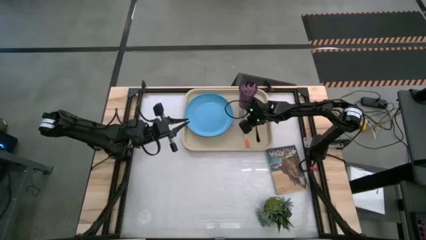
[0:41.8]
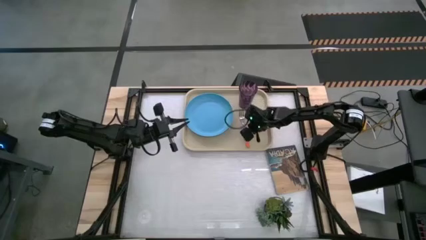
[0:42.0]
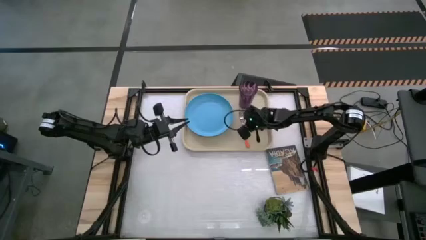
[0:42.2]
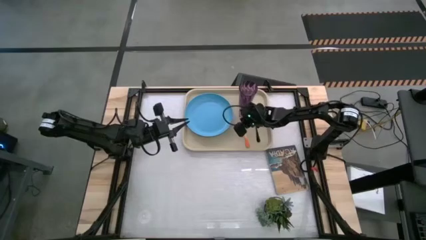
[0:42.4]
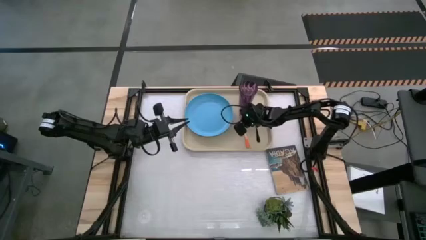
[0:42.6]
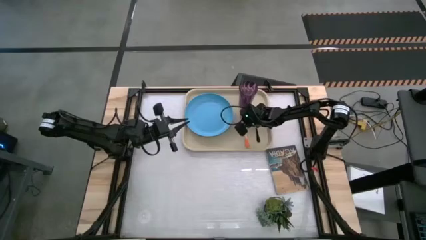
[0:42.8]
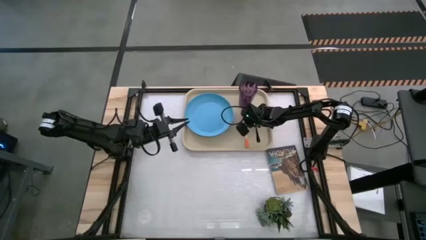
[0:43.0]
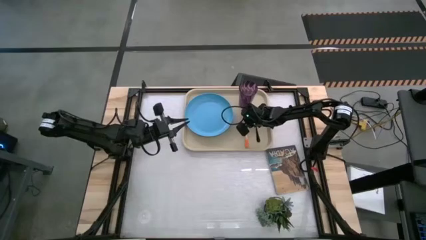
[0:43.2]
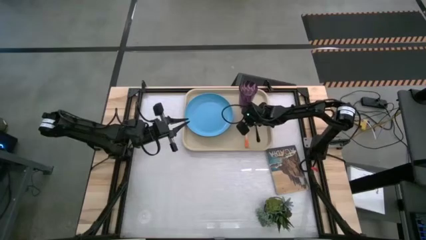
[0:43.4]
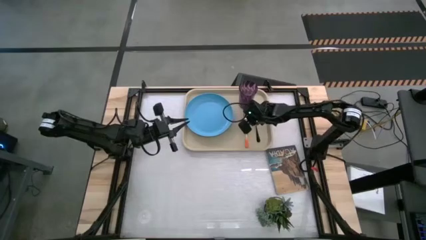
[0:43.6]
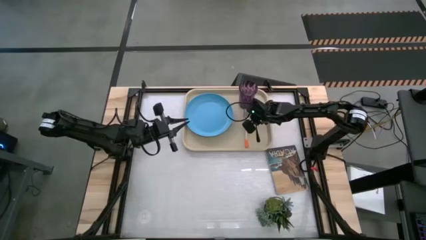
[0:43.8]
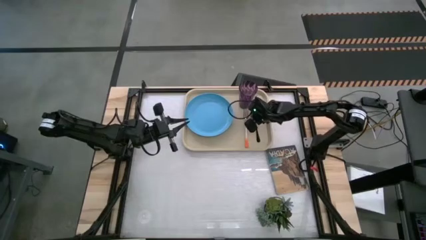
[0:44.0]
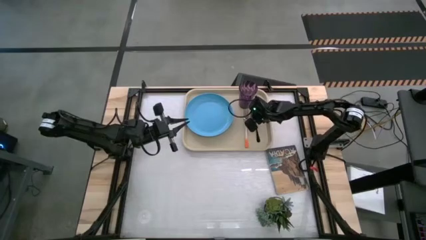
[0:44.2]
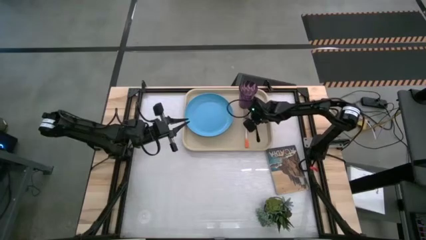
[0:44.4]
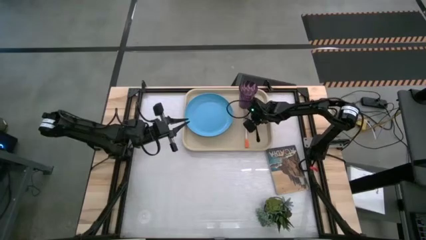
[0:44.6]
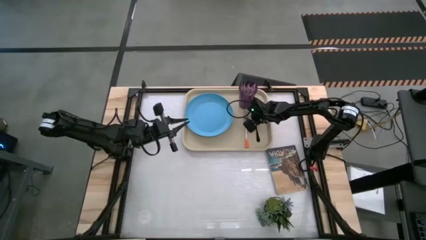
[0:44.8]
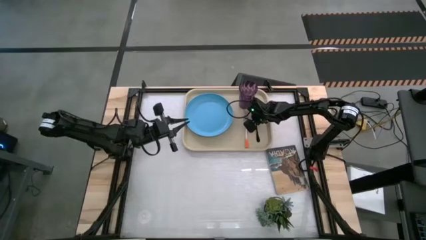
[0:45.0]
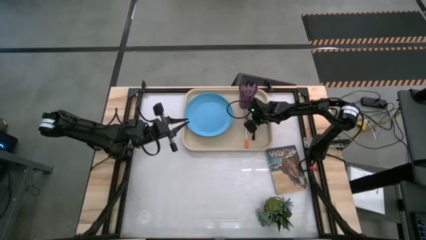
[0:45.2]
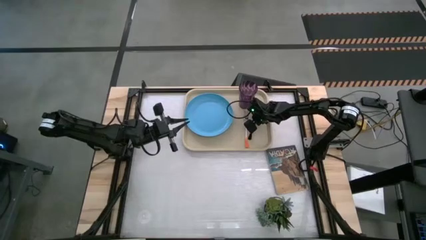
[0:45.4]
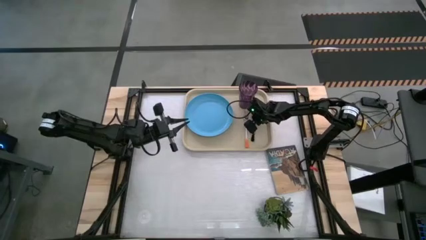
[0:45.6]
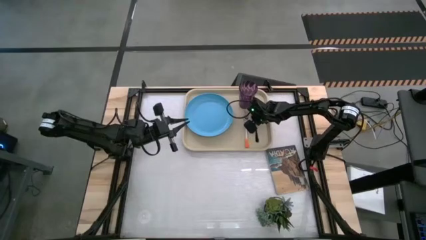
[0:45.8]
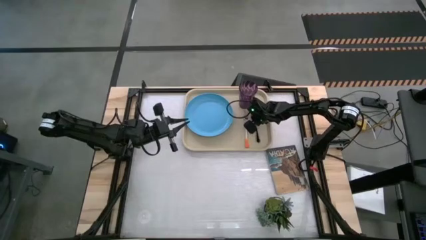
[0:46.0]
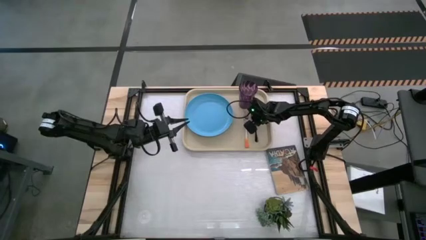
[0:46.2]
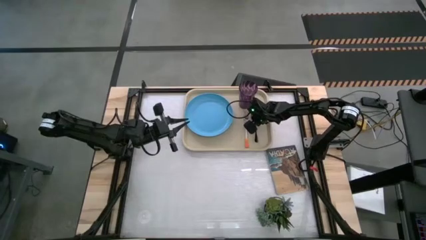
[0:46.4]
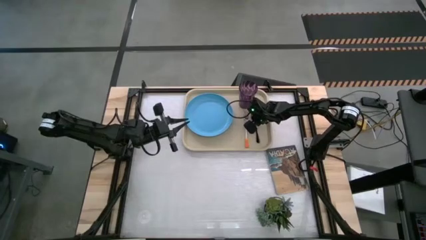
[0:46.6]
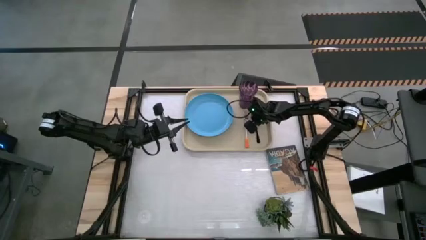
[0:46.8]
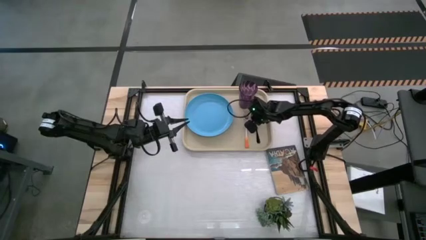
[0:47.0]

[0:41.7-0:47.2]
Task: Pick and place plate/cup/fork/spoon on tray
Adjust the black spoon

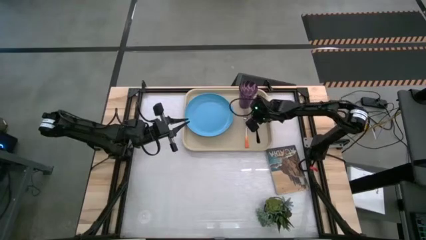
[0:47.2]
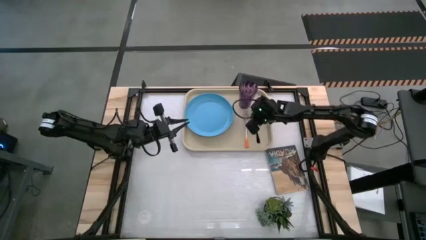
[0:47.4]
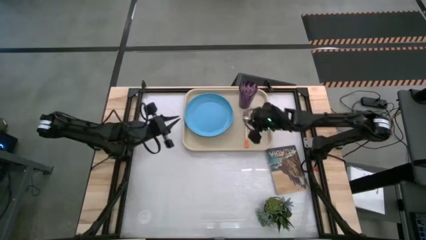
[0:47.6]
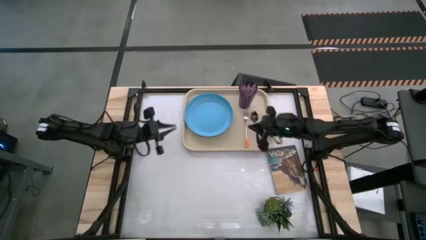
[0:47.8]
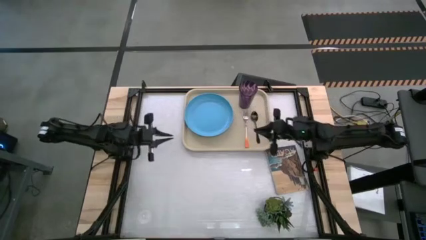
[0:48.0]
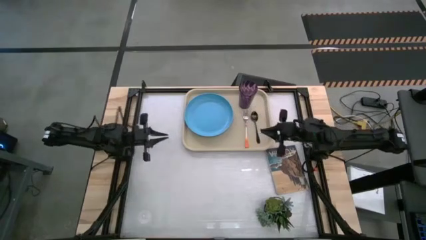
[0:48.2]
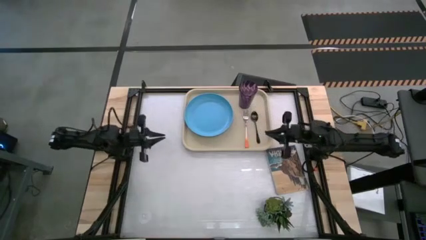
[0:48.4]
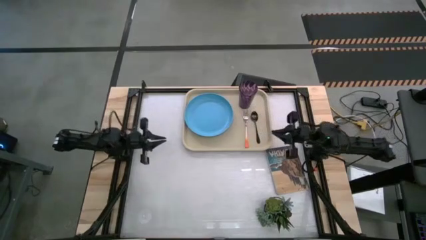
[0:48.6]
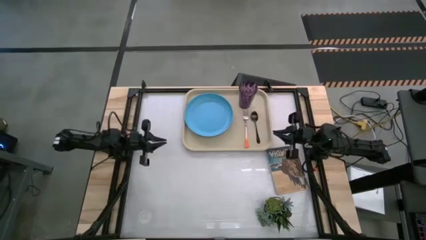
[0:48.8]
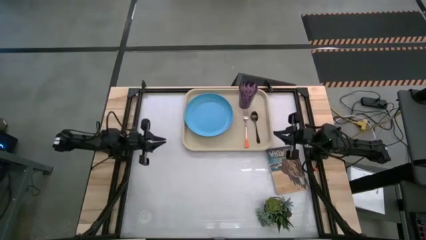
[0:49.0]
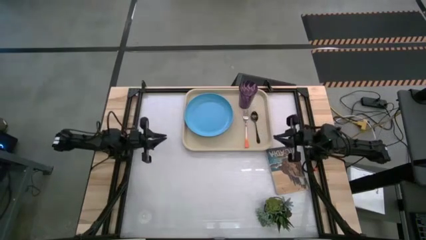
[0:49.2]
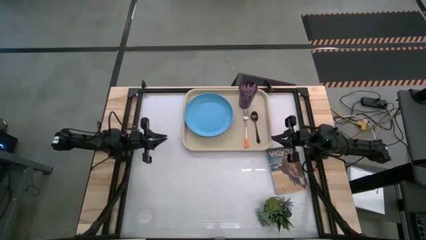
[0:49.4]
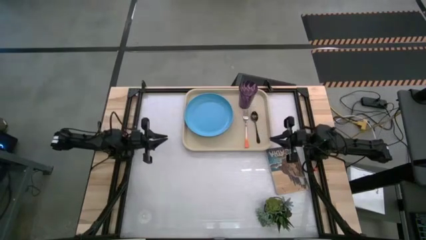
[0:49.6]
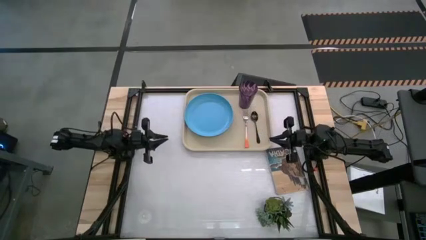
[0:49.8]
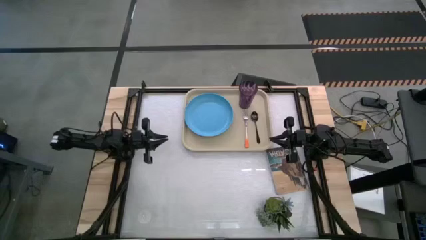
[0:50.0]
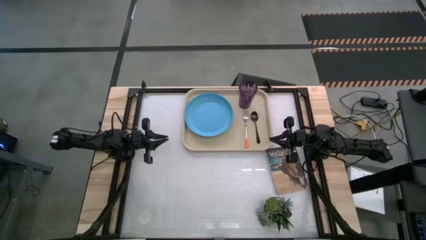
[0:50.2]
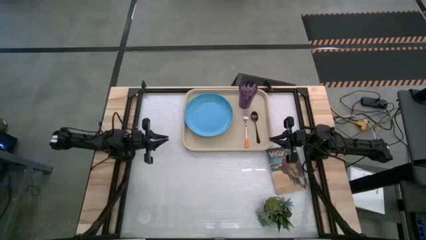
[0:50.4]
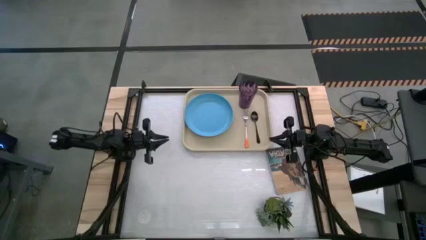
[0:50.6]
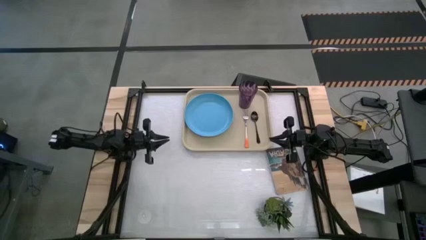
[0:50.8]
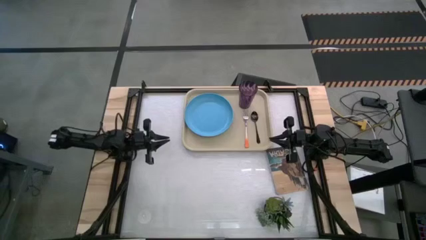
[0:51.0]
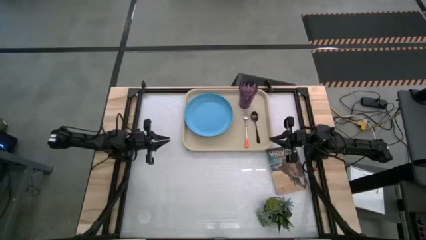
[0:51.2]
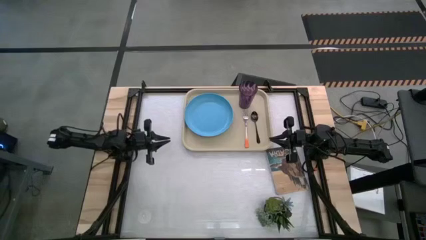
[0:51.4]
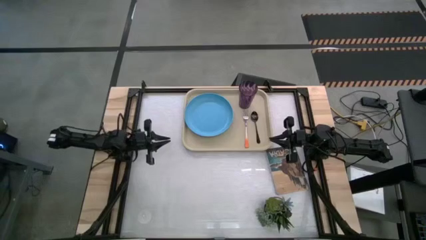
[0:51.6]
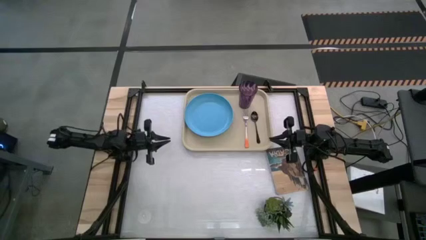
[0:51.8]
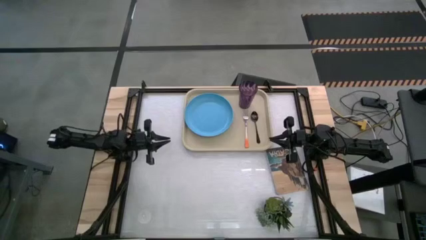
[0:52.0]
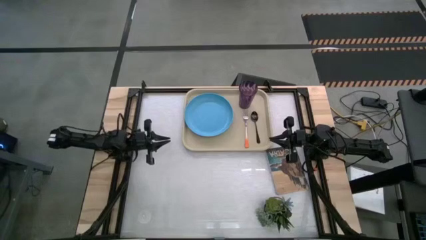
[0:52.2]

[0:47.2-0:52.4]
Return to Home Position

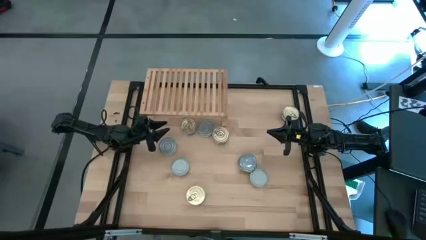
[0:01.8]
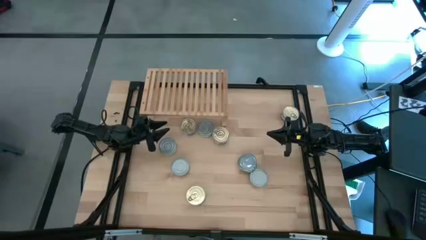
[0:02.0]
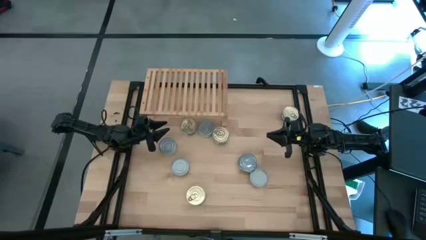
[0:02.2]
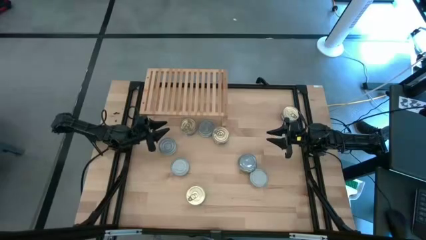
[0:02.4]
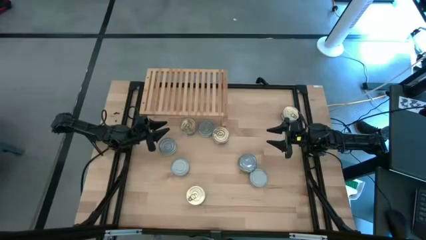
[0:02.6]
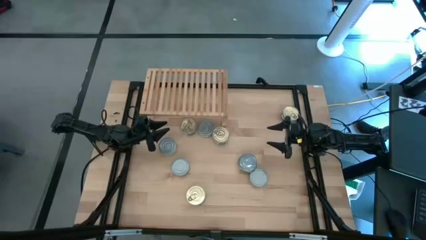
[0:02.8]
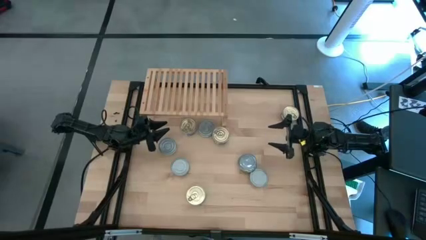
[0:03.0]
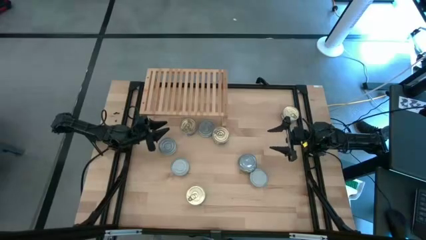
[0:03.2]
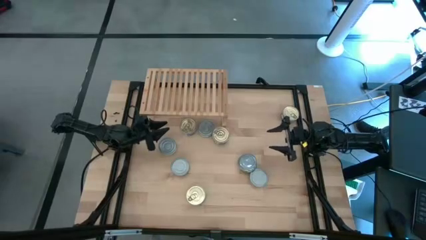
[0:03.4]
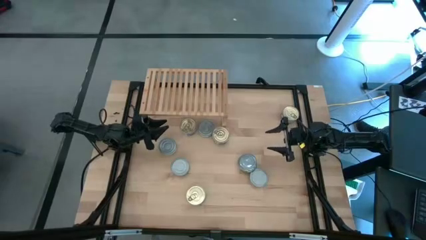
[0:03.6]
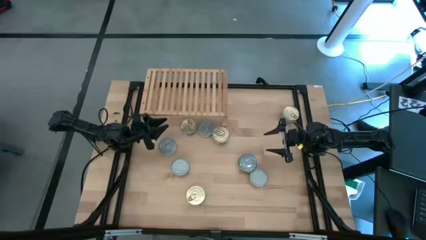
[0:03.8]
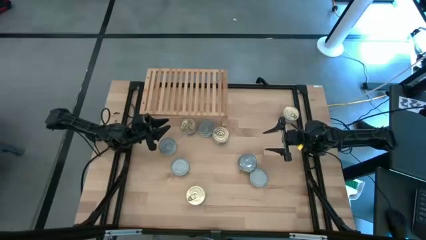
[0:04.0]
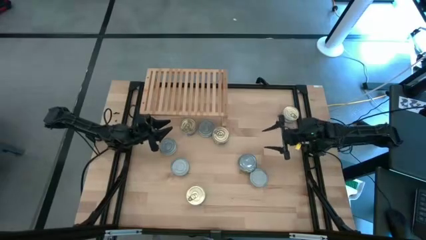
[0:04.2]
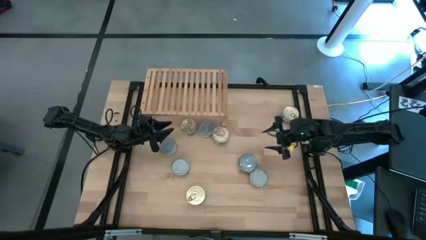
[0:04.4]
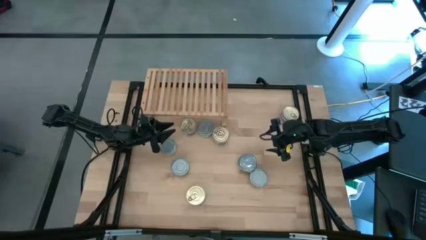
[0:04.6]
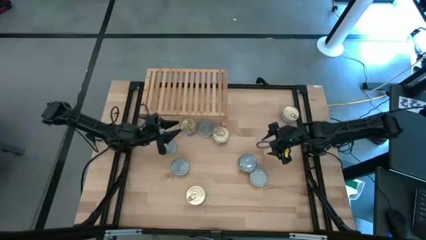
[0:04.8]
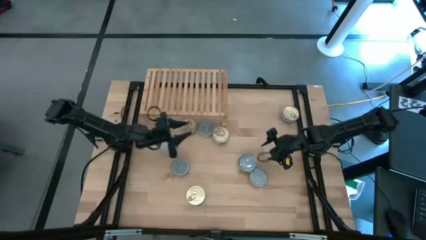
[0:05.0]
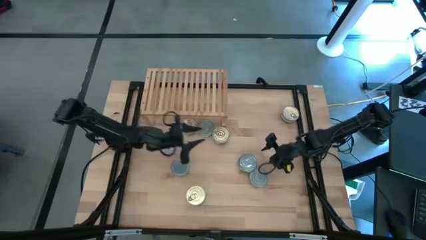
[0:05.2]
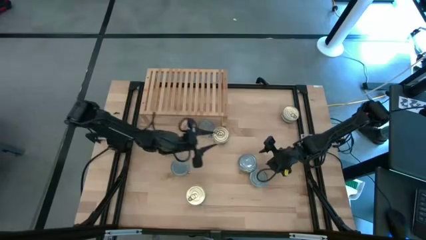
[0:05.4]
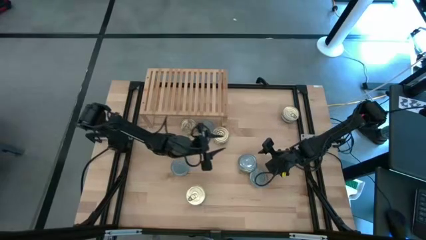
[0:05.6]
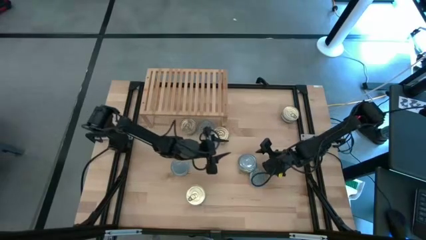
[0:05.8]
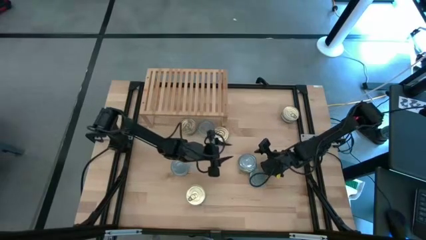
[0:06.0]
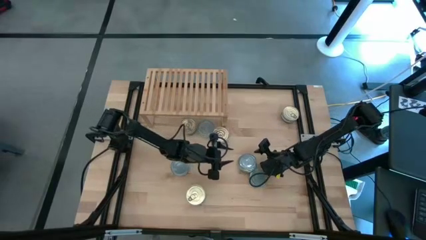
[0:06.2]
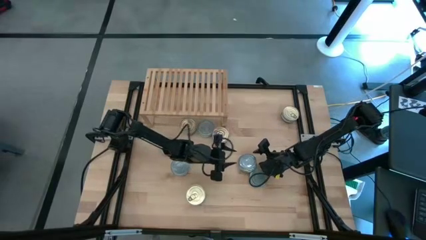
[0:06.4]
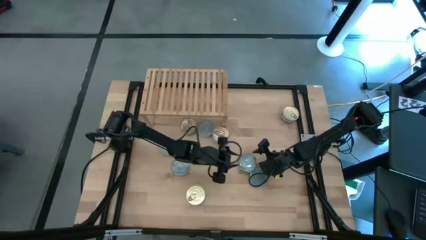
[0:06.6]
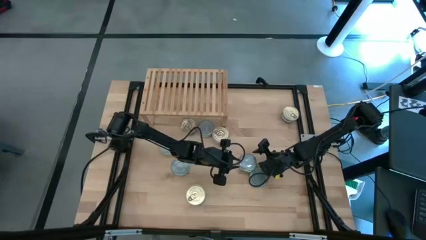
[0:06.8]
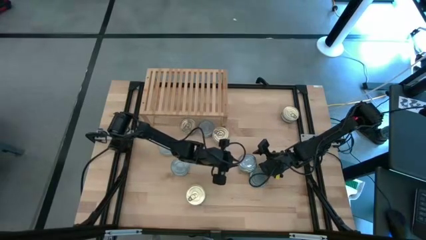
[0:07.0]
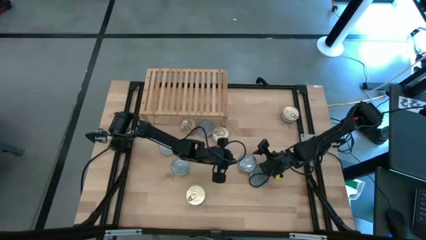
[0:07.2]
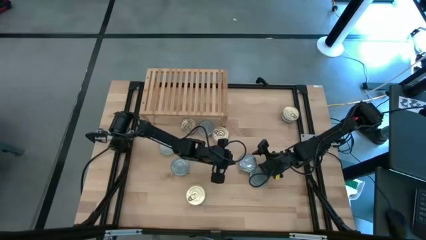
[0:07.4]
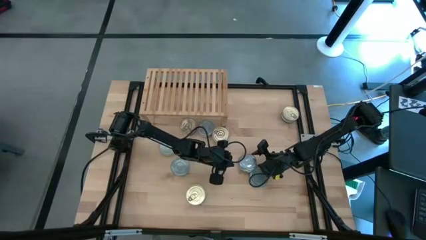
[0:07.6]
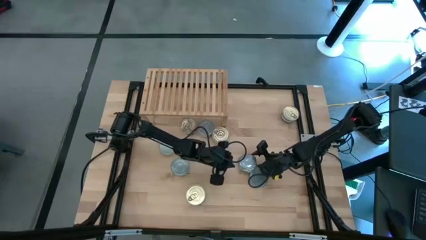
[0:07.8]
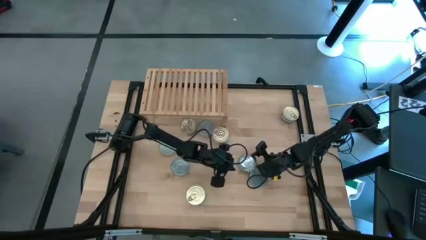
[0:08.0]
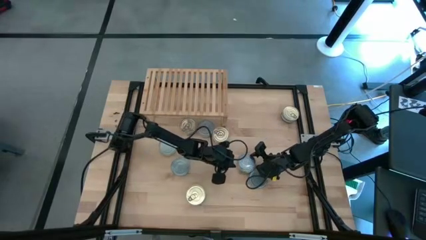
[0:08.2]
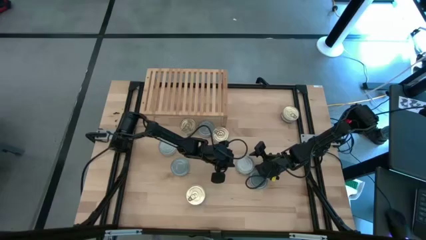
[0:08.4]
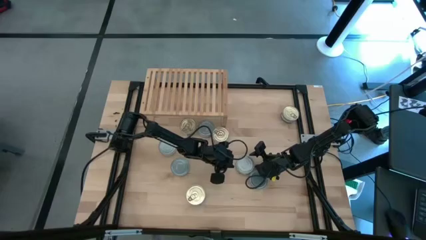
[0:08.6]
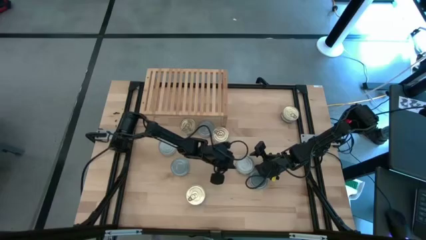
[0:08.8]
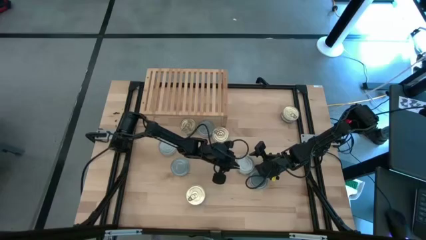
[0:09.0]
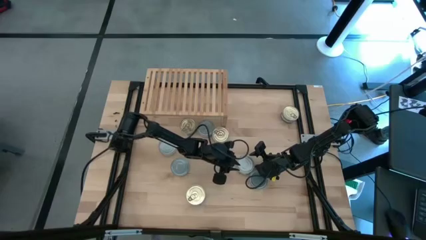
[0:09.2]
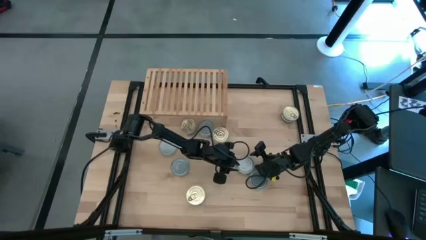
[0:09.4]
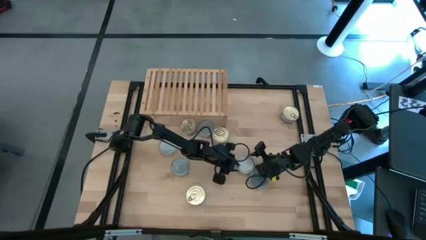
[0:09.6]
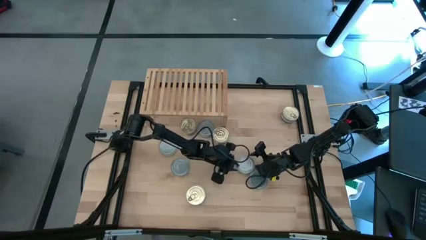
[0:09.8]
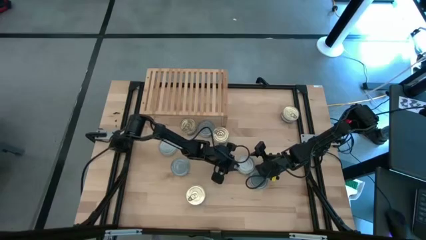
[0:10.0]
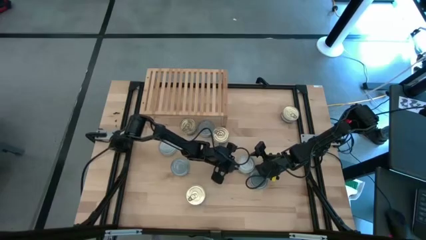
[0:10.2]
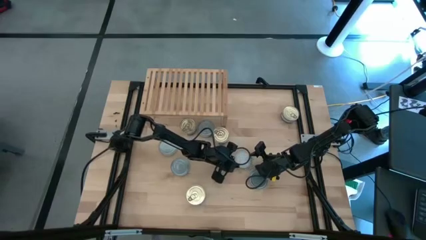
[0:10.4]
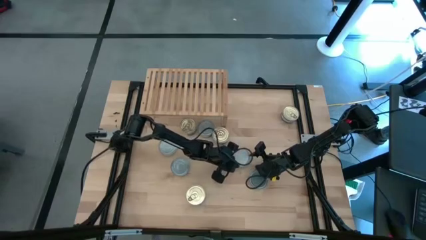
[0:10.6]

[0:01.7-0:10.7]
Task: Stack canned seafood by type on shelf
Put the green tuna can on the shelf
